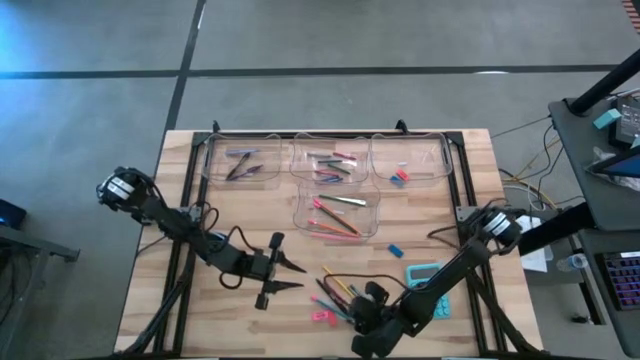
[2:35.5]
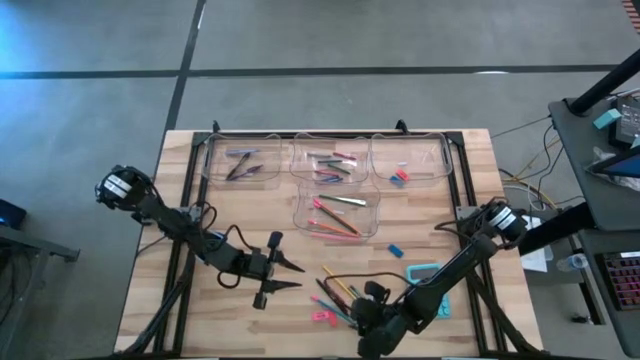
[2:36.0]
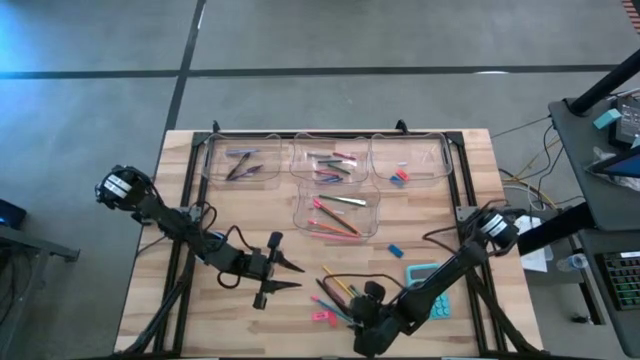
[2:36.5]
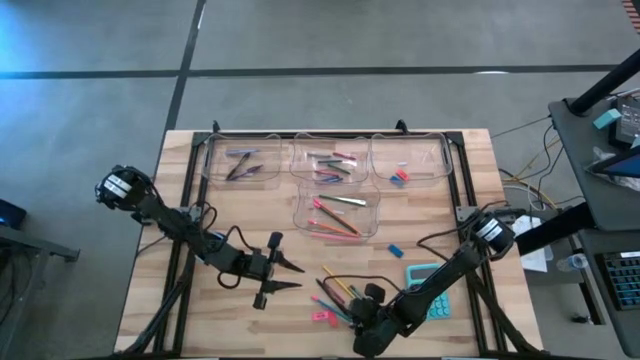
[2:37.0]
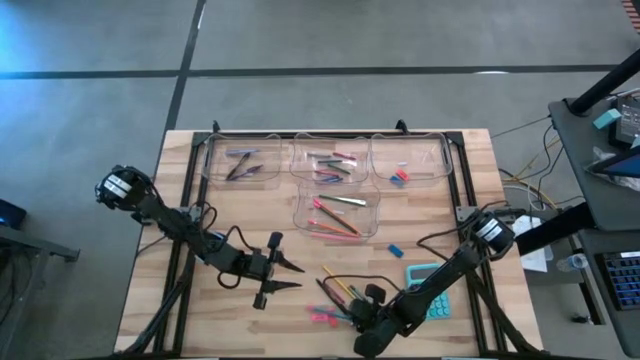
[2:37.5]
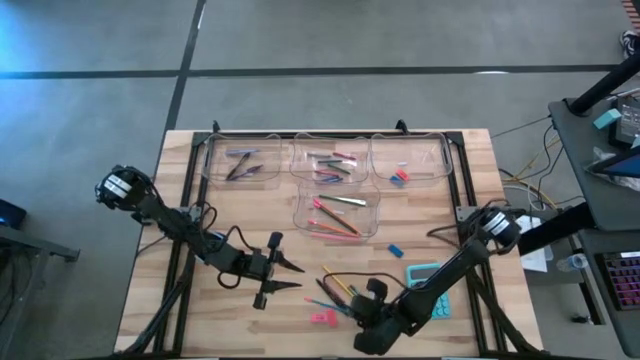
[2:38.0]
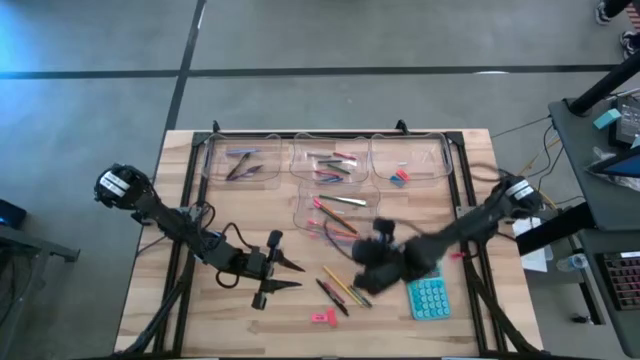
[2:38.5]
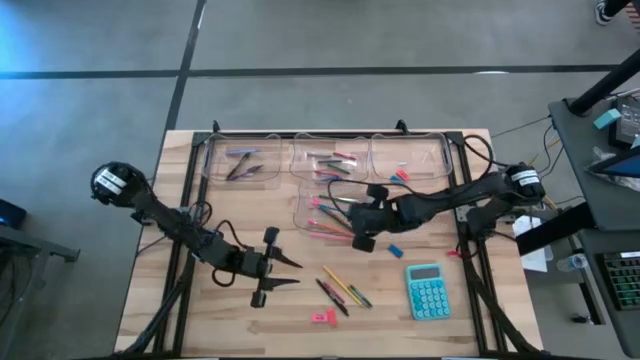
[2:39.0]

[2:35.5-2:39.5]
Task: Sort crayons/erasers/pens/pencils in bins
Put the blue pencil into the bottom transparent bin

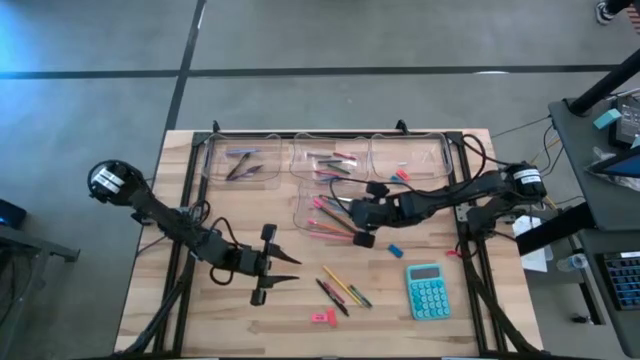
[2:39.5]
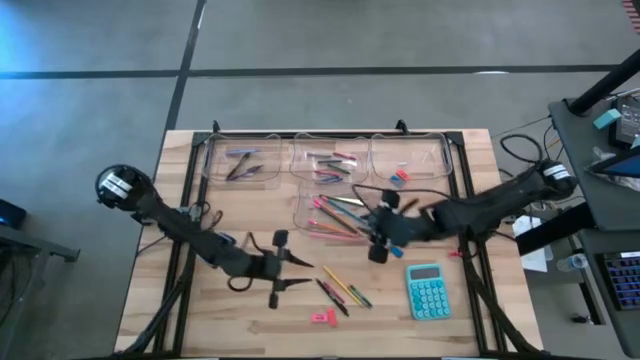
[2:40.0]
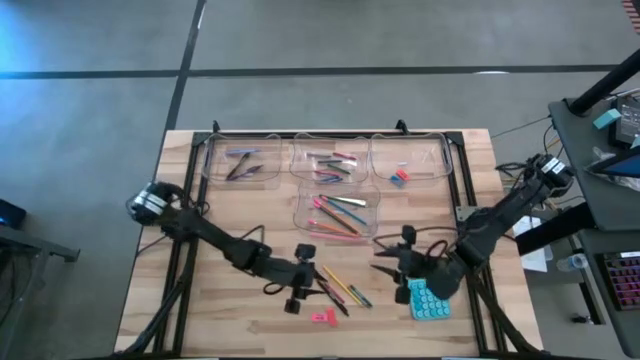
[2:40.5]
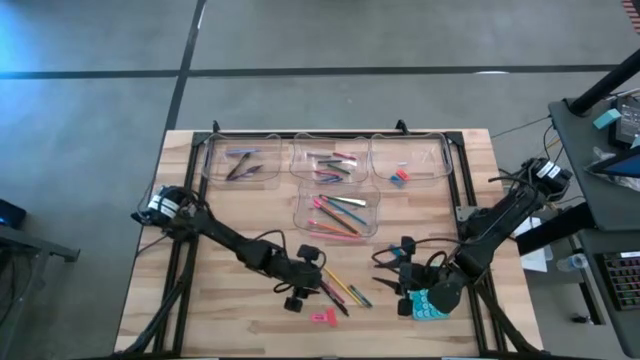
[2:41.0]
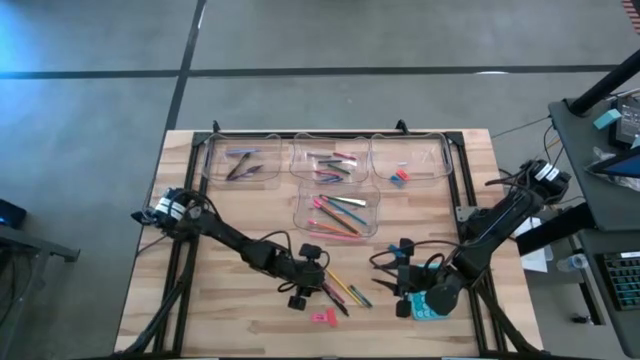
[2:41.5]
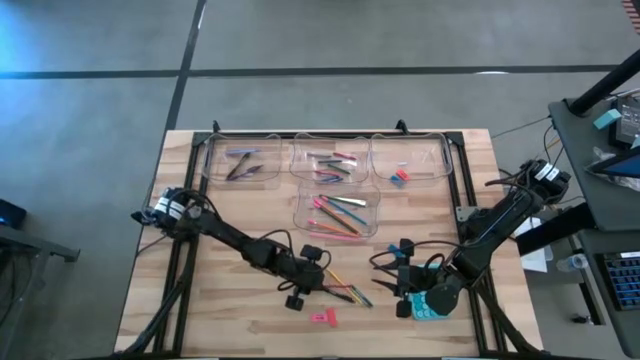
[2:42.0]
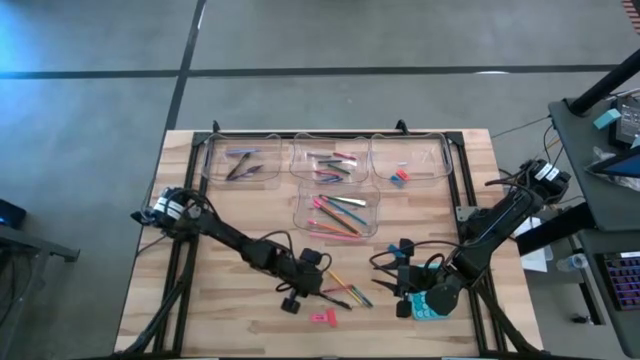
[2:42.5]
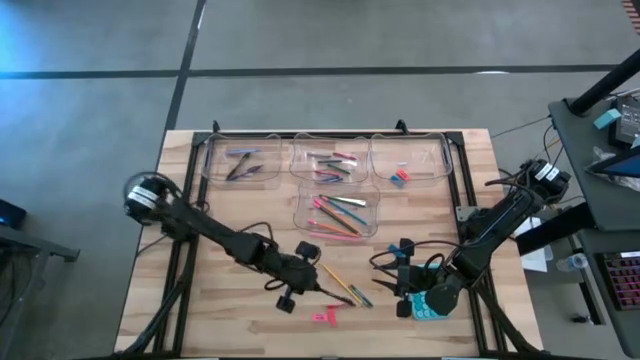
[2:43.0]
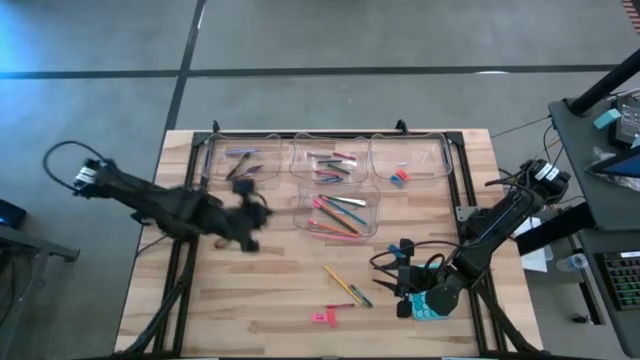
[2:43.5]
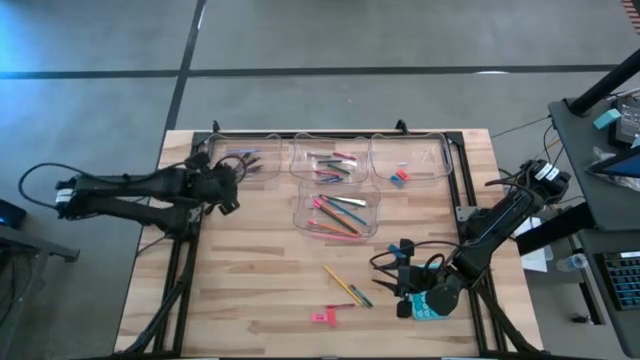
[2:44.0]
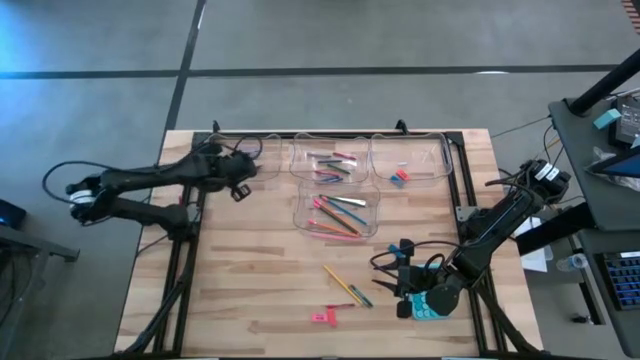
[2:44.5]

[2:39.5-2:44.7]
Put the black pen into the top left transparent bin

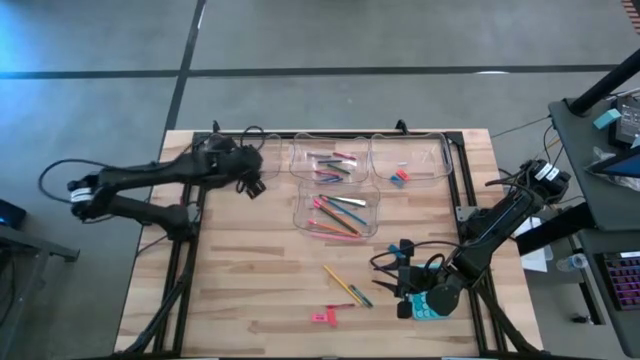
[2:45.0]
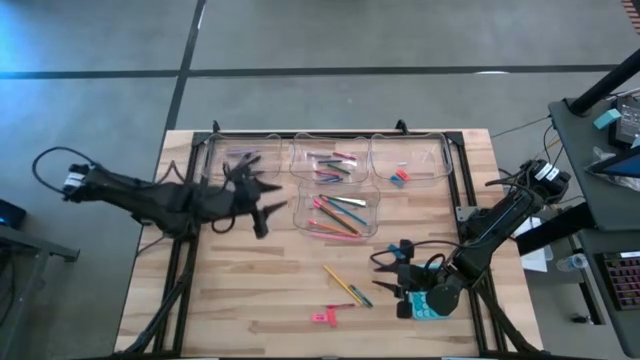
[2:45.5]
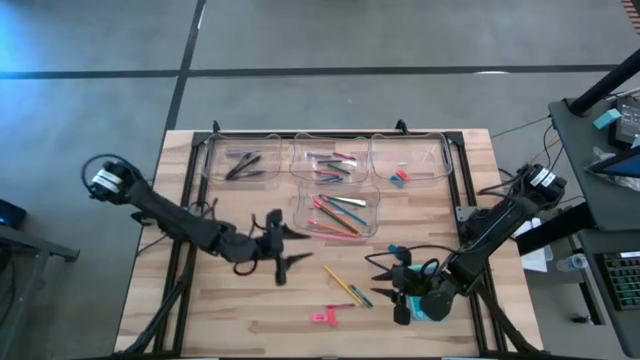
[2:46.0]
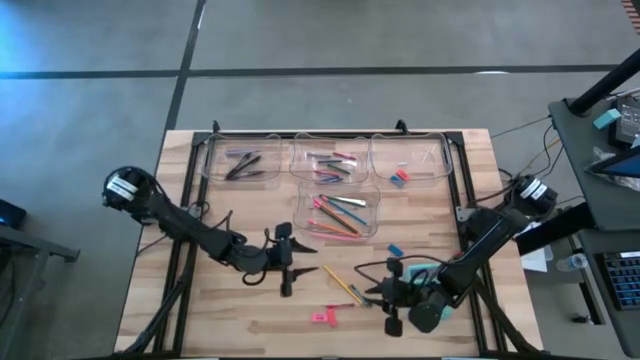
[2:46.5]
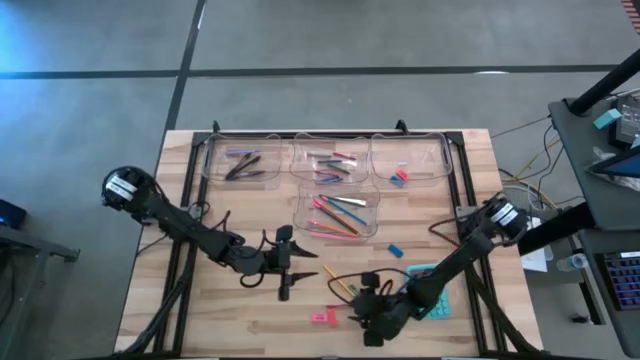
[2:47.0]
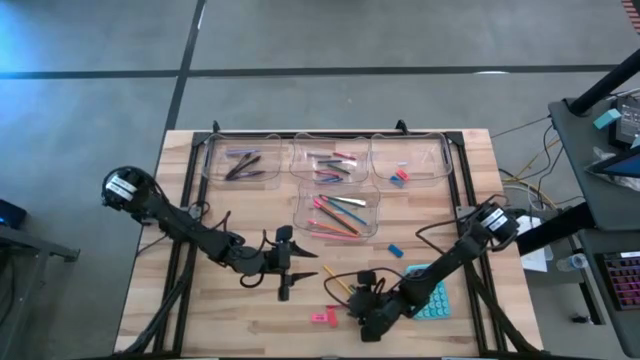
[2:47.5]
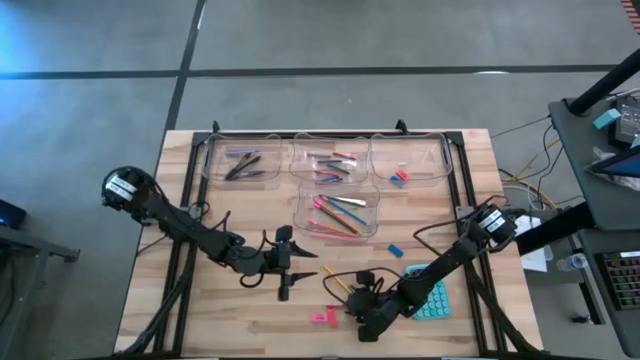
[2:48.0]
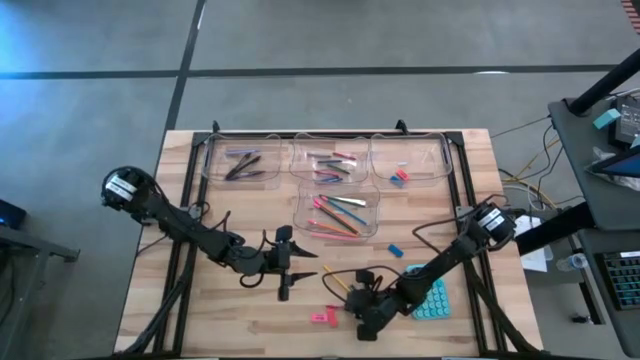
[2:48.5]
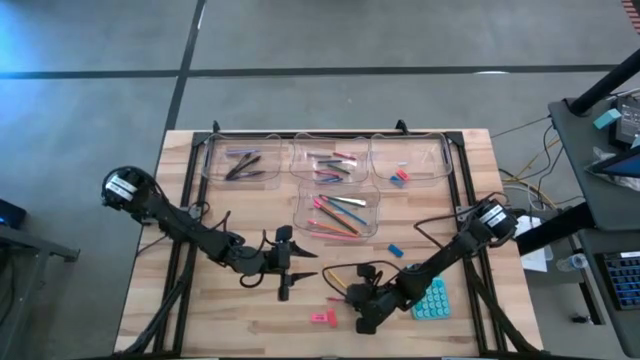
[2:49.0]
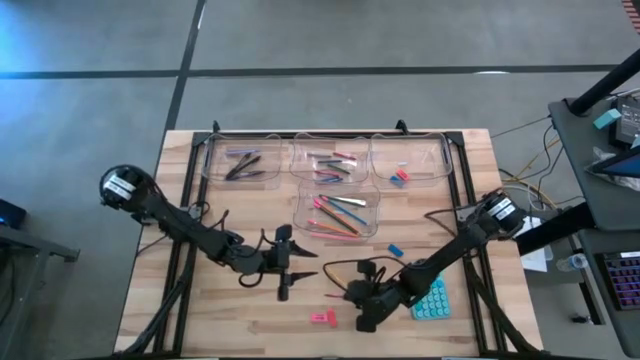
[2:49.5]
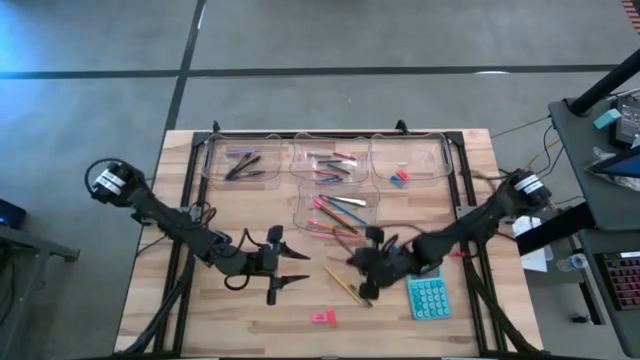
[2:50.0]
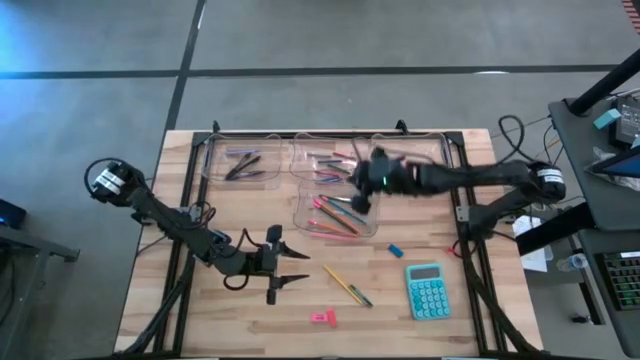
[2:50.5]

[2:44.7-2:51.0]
Put the red crayon into the top middle transparent bin

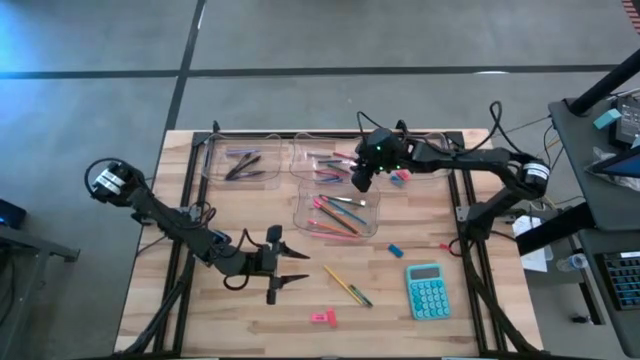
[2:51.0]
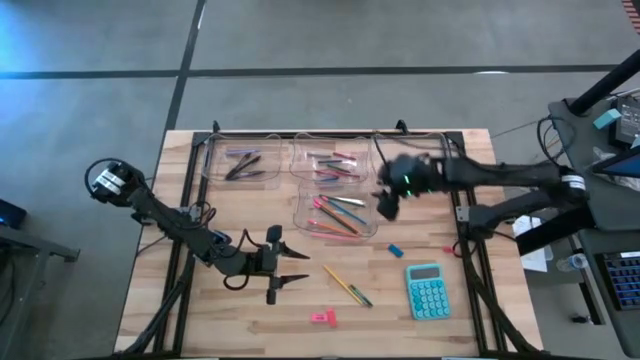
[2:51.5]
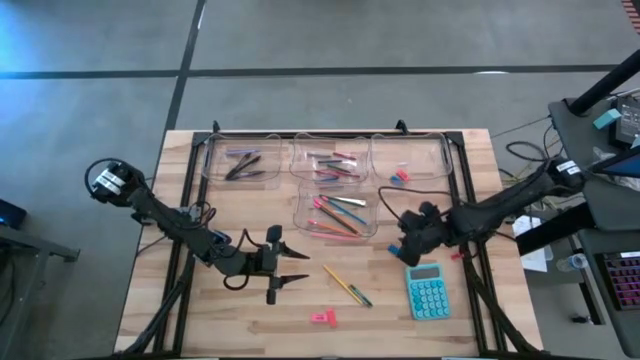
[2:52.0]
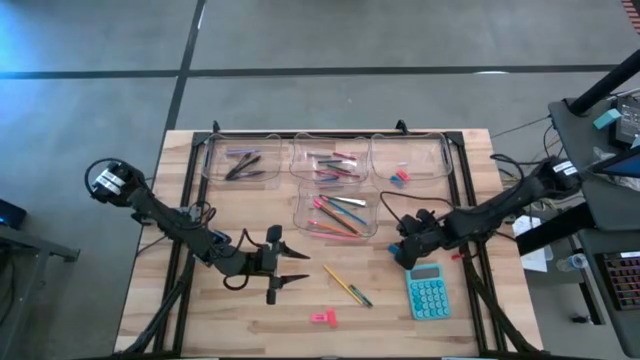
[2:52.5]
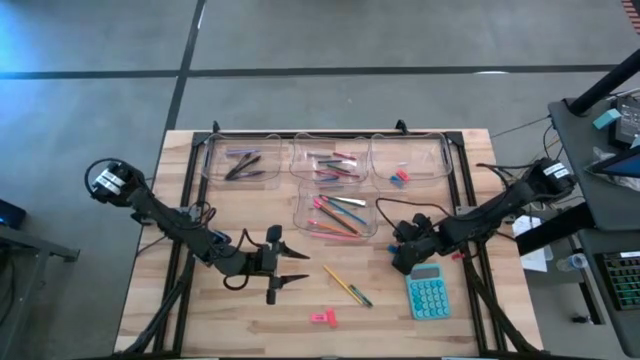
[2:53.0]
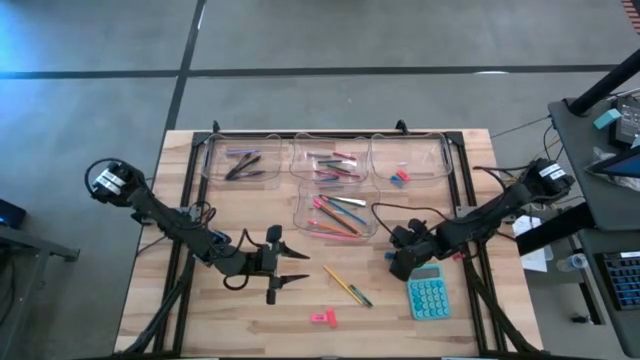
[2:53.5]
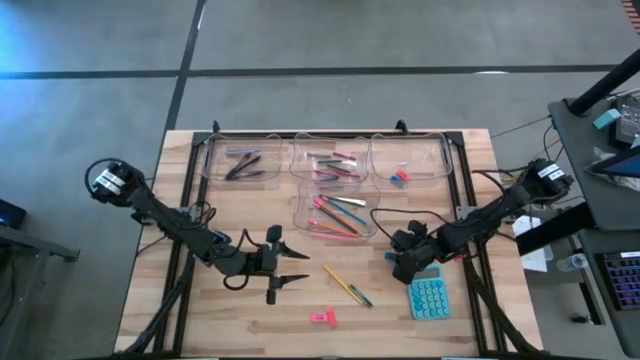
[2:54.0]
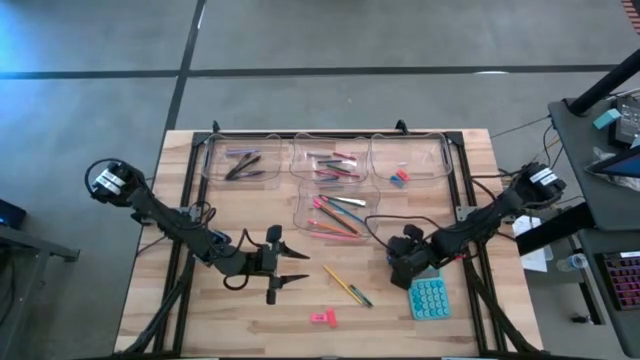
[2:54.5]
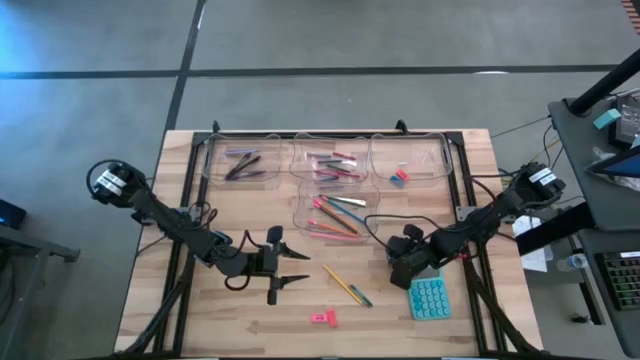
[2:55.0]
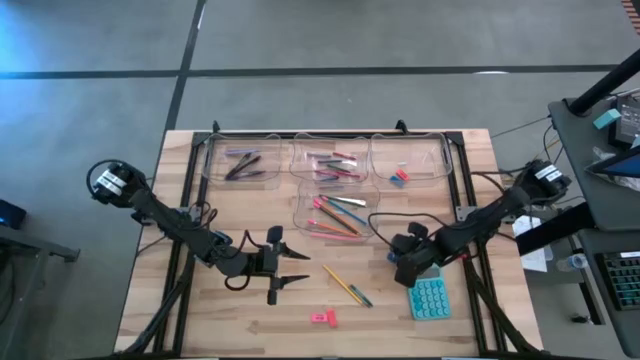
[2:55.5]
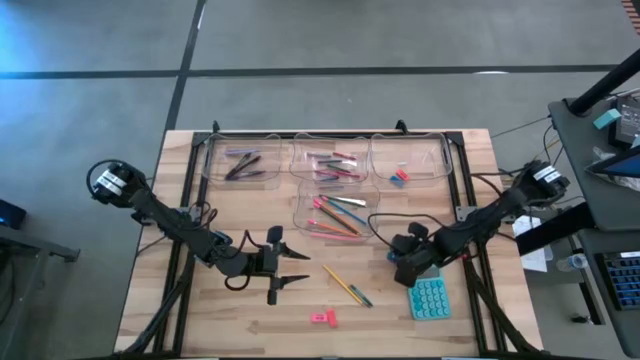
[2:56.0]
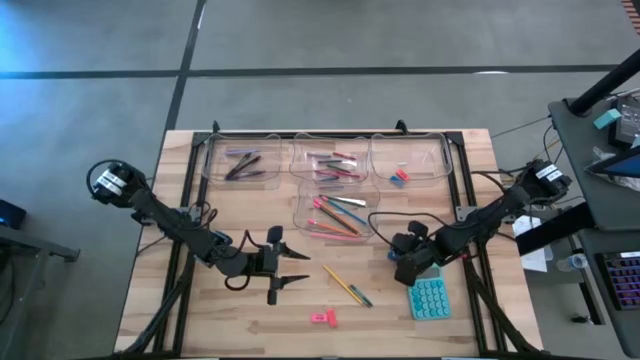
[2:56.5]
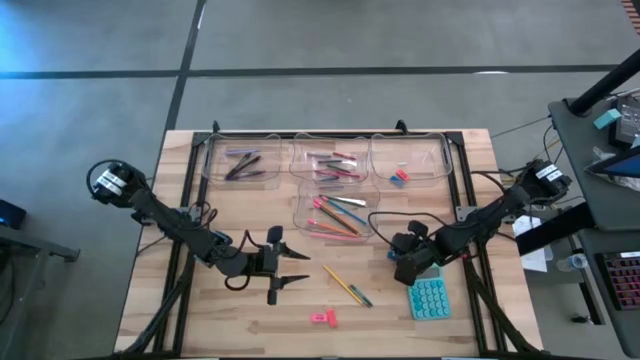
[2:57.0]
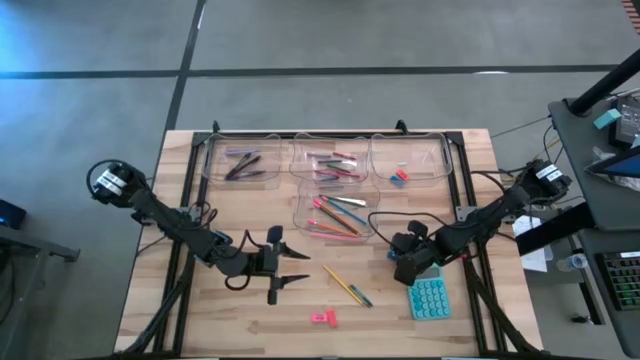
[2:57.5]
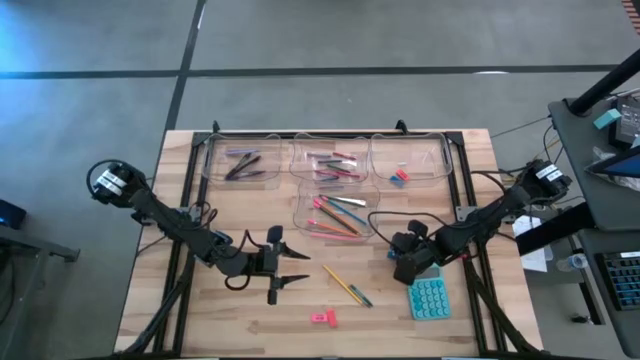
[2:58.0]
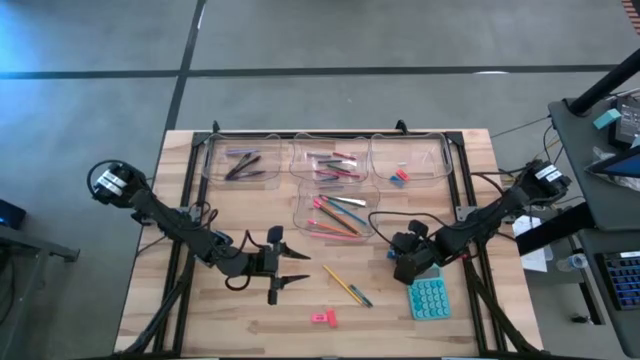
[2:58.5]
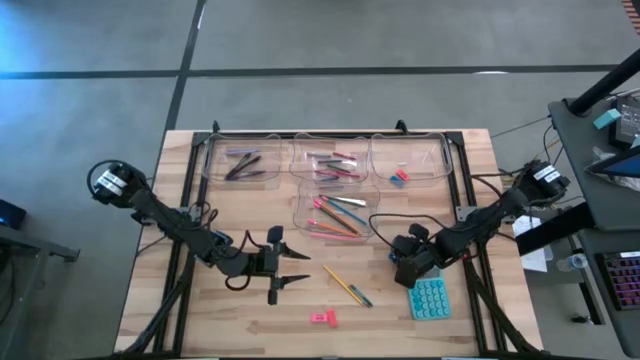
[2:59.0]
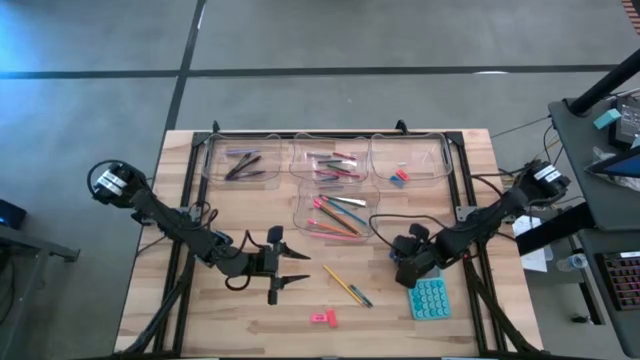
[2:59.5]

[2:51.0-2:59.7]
Put the blue eraser into the top right transparent bin
